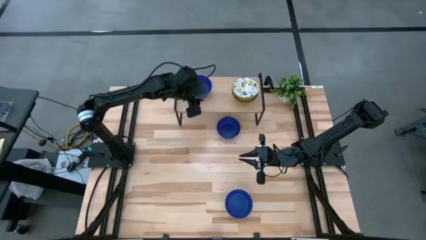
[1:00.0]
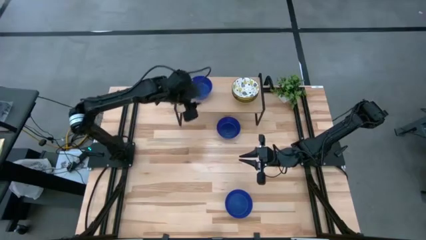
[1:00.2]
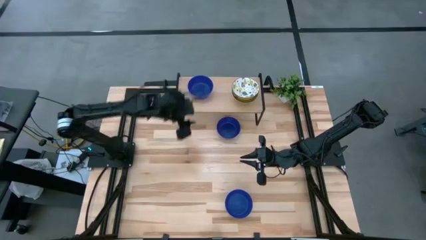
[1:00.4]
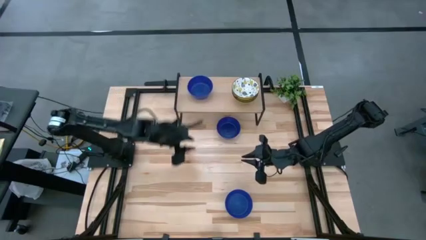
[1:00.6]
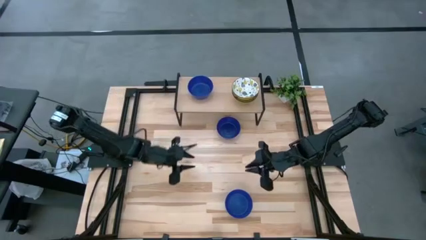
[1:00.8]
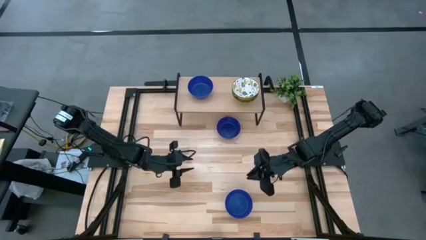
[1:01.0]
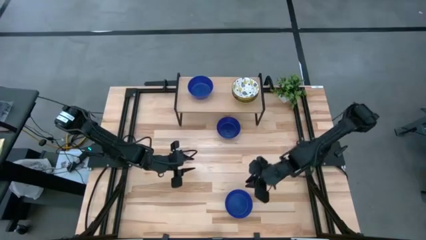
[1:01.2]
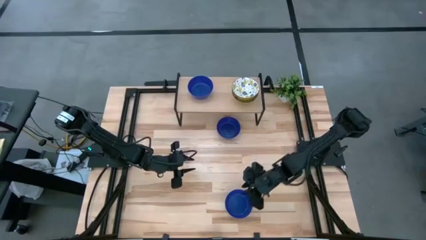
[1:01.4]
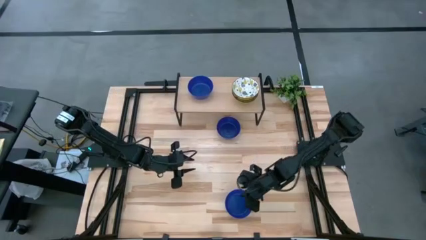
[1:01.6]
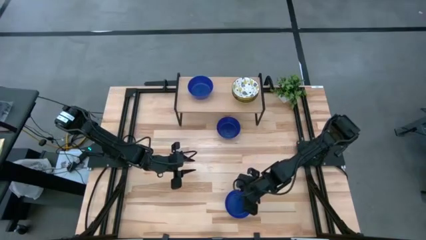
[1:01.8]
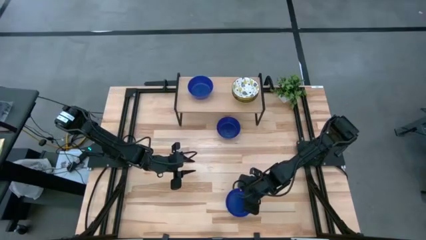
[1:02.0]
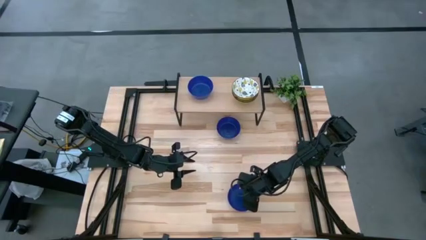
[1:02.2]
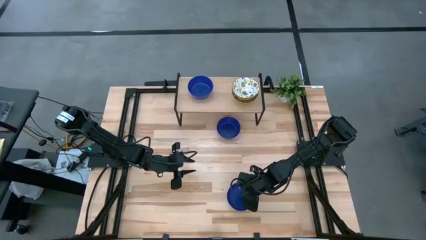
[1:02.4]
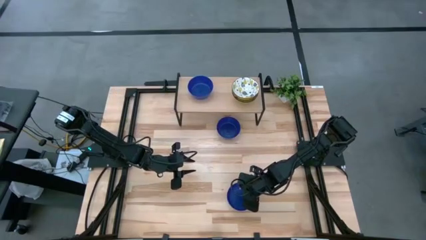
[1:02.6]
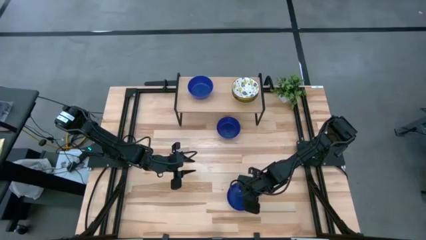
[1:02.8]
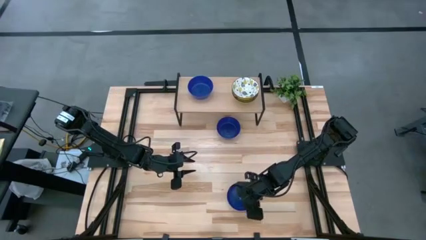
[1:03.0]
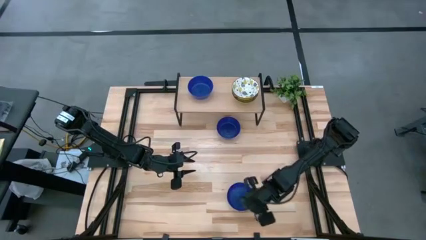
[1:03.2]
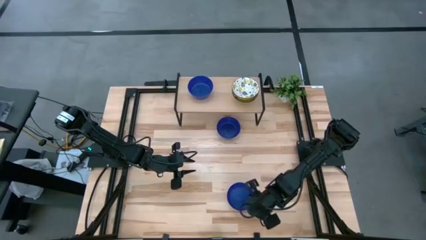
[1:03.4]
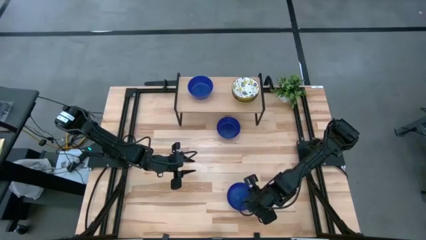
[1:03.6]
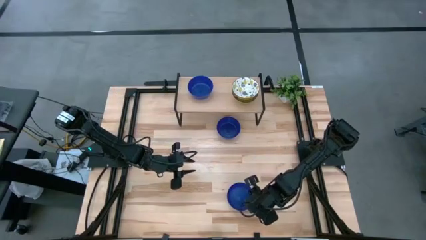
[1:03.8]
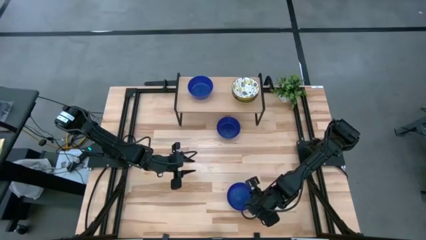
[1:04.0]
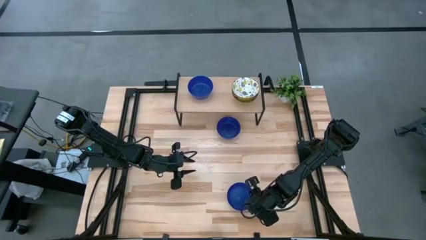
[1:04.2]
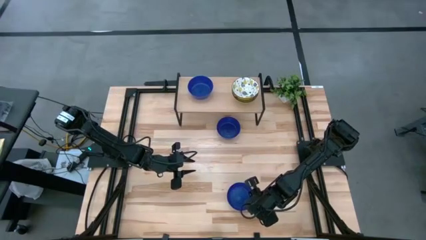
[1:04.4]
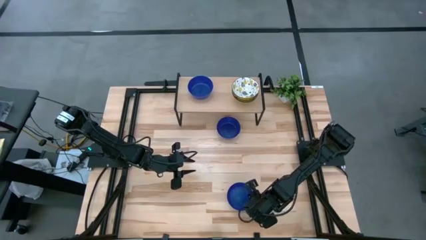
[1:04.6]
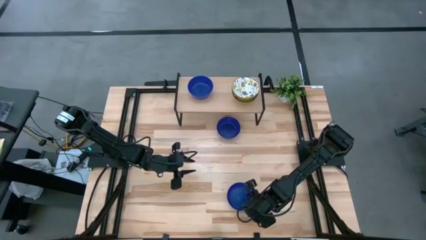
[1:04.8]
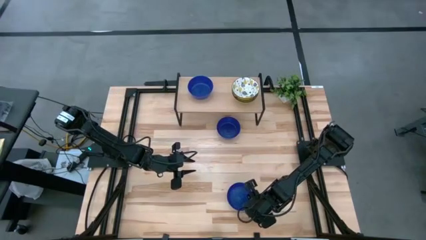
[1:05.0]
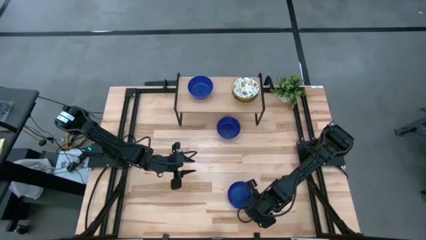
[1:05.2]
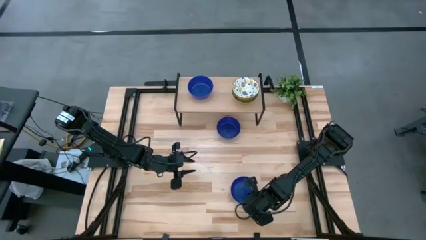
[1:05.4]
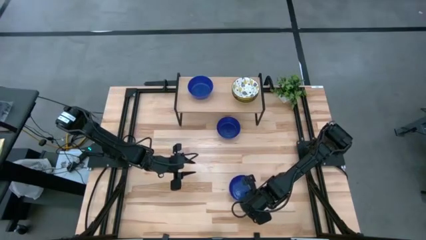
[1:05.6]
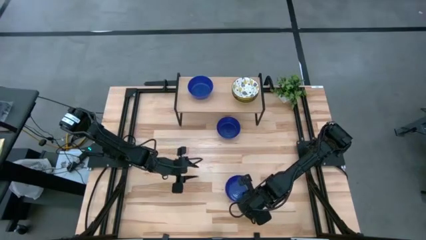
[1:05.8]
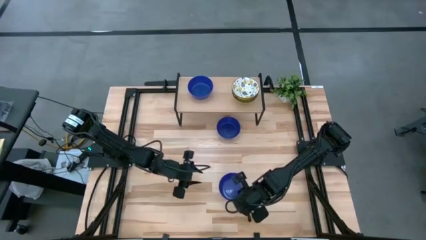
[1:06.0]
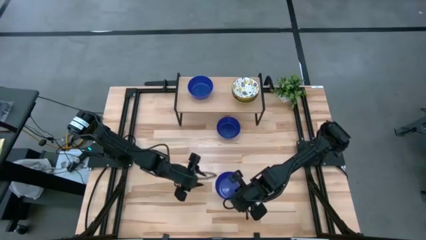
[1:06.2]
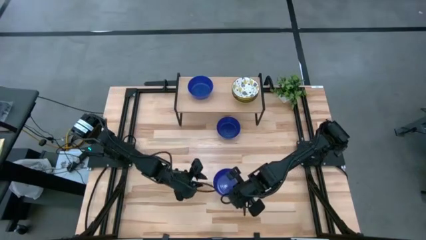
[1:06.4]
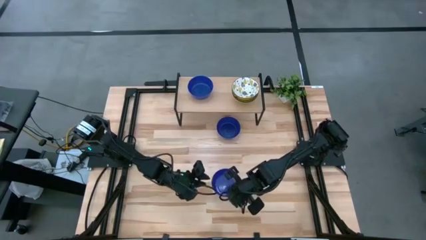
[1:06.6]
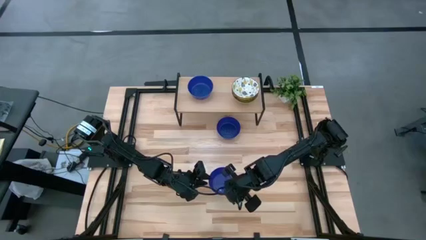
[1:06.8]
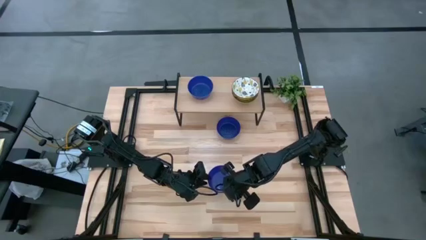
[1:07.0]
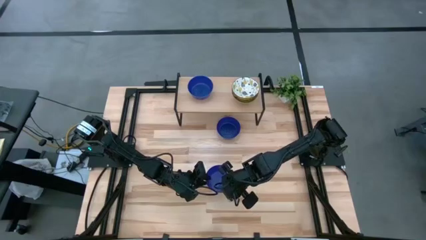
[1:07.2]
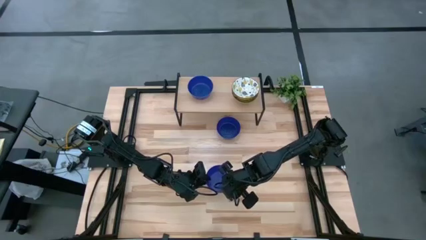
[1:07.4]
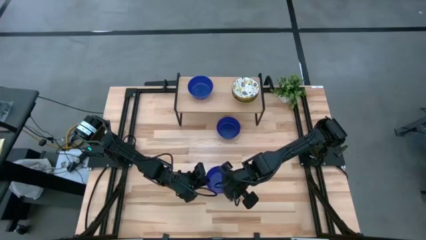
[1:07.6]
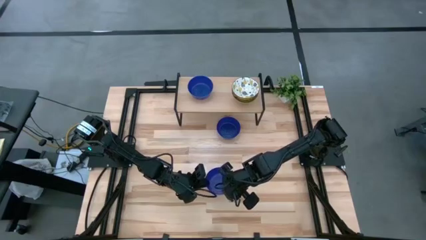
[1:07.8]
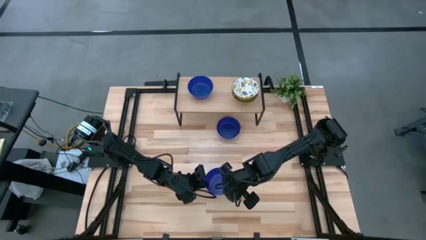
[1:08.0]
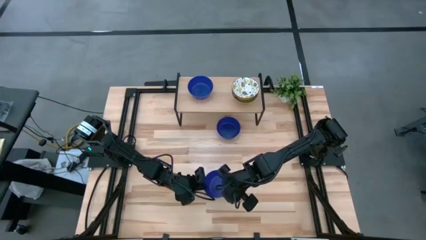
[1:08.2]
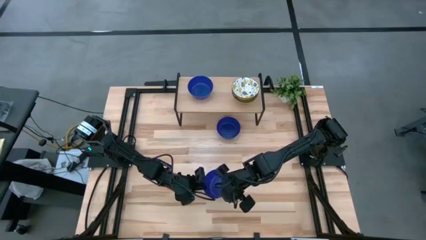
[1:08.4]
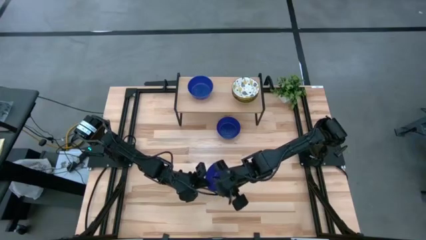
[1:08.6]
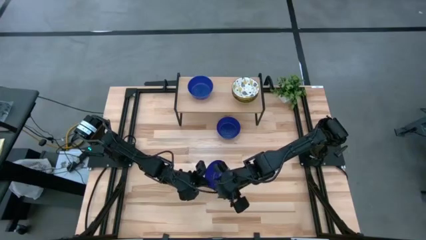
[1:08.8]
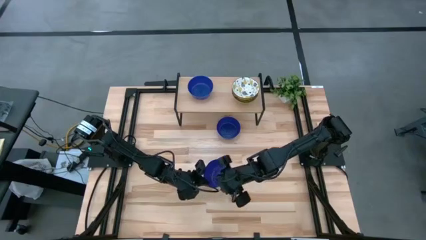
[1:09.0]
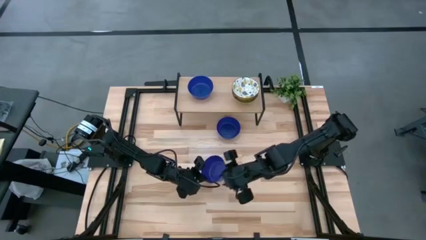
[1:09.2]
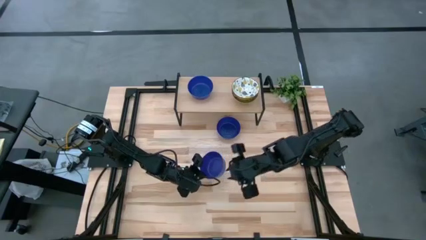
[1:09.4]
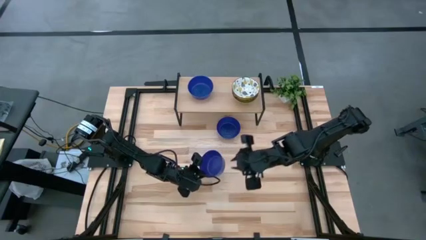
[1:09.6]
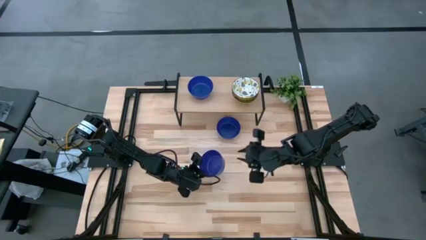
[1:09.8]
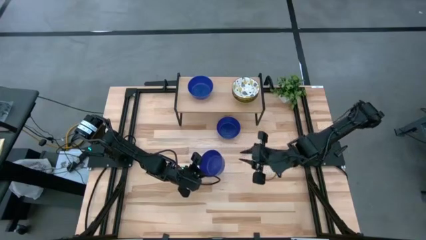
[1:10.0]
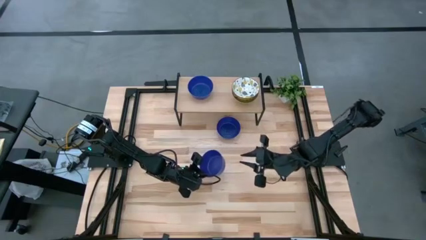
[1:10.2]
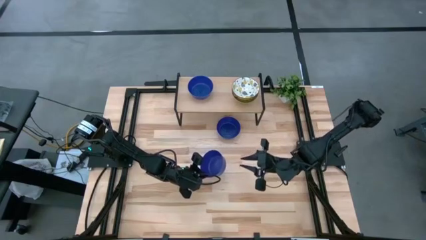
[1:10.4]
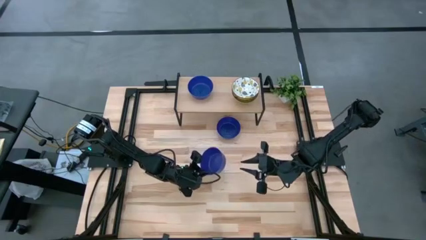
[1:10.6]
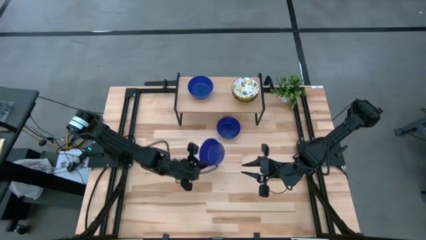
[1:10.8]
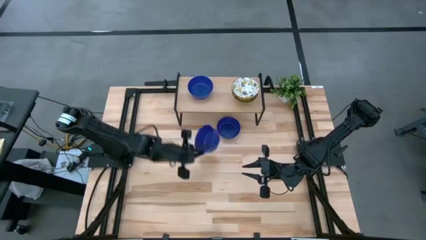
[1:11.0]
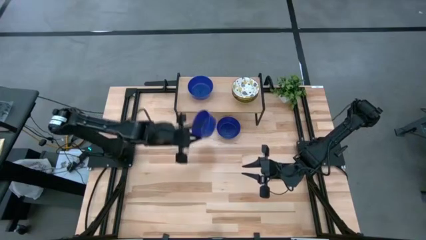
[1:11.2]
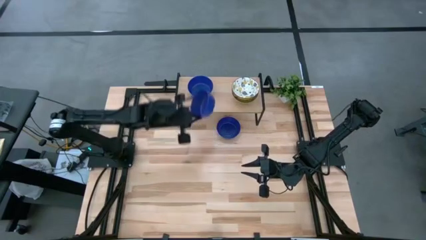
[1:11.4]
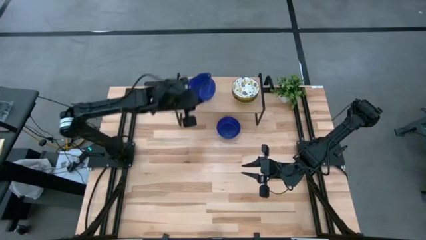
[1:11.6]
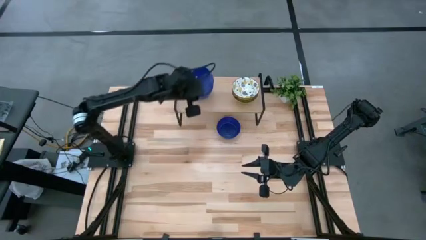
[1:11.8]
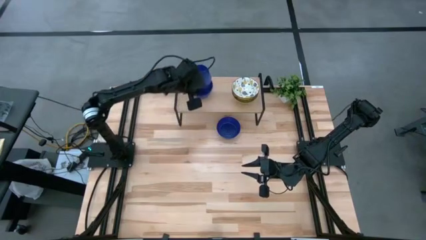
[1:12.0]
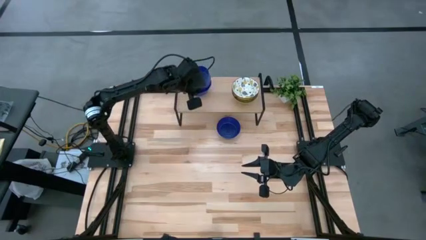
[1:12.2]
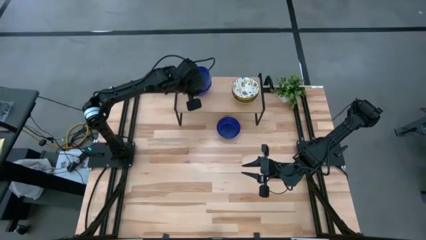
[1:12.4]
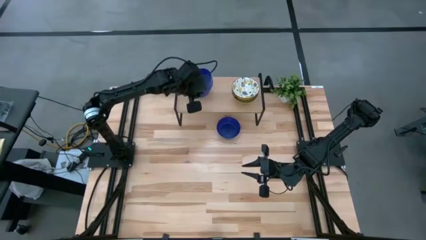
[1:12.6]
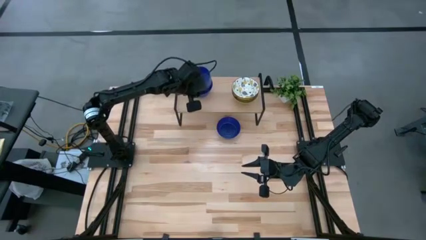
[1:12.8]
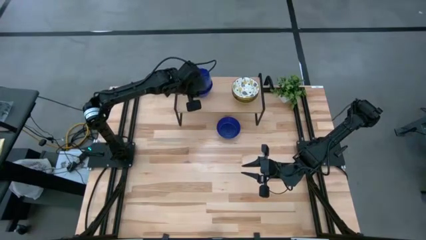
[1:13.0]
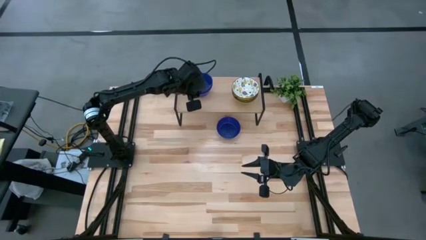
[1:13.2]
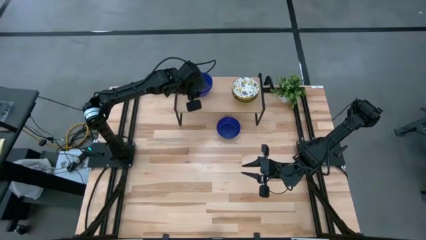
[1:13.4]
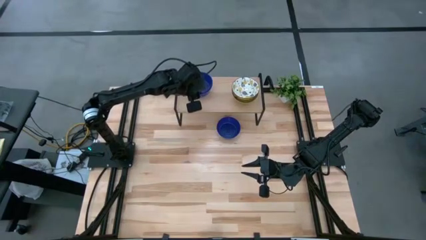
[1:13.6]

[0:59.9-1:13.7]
Task: Pick & Place Mini bowls
Stack the bottom blue bowl on the blue bowl on the shelf
